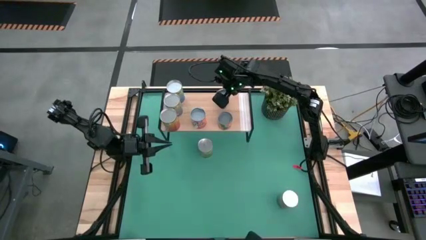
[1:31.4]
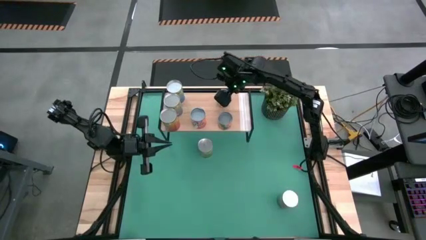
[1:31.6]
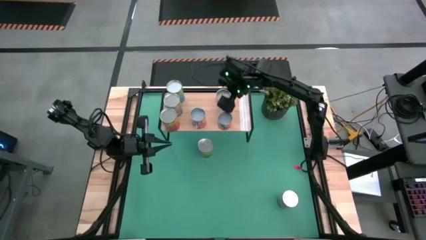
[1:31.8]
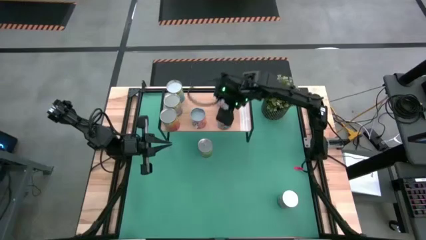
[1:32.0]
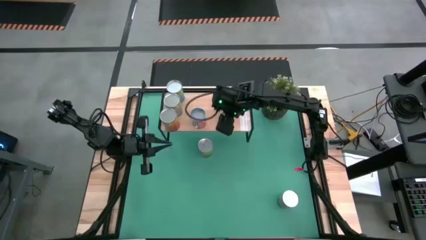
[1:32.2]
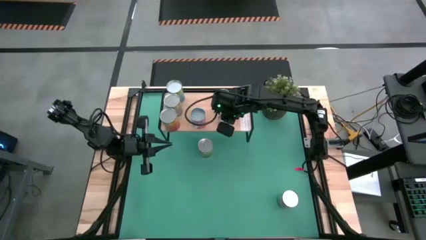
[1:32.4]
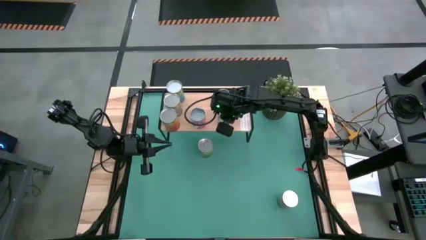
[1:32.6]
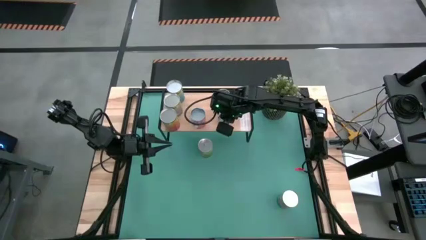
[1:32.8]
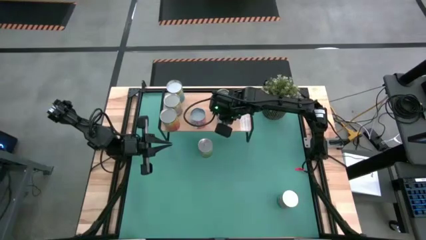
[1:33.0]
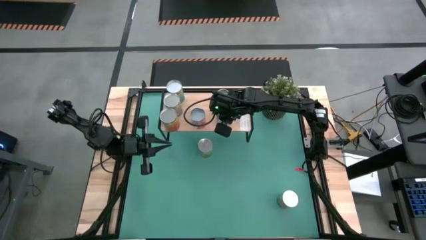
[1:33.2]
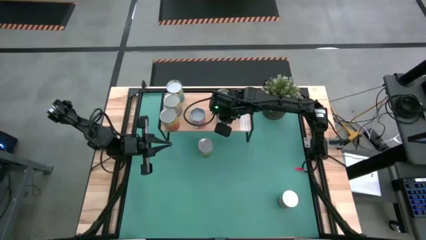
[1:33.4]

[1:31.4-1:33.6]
Task: Pick and place cans onto a shelf
Adjust the small canned oranges

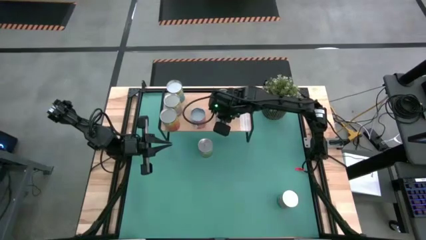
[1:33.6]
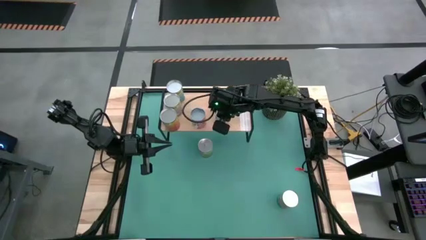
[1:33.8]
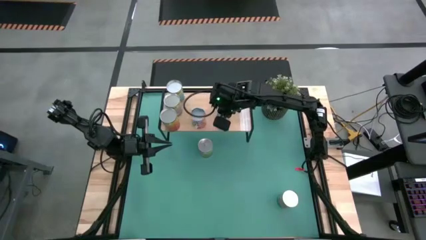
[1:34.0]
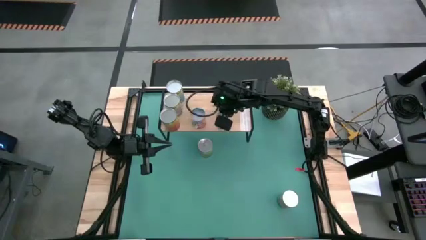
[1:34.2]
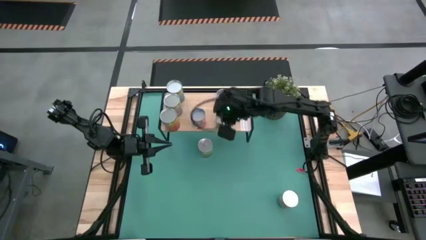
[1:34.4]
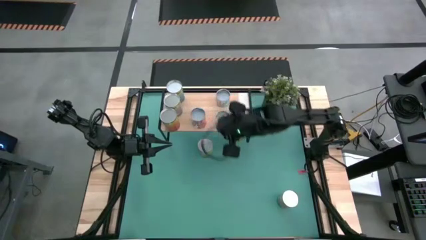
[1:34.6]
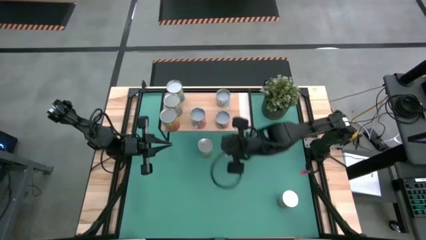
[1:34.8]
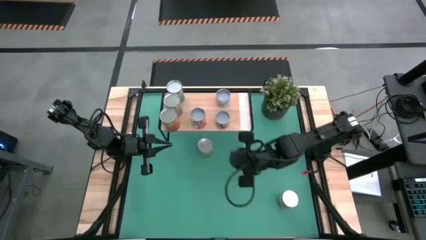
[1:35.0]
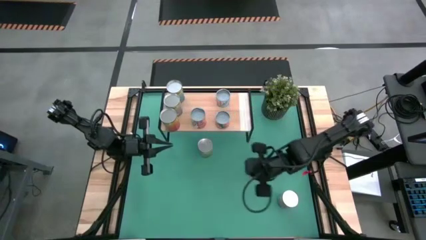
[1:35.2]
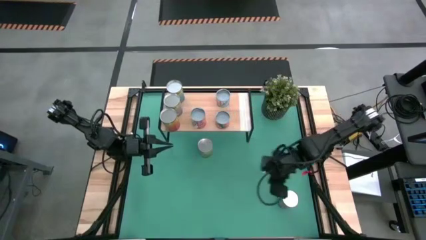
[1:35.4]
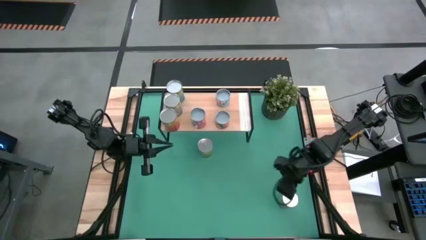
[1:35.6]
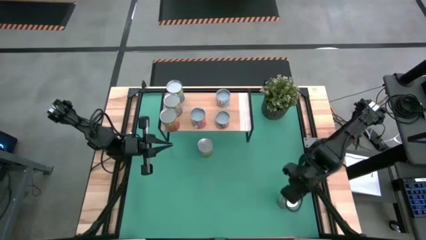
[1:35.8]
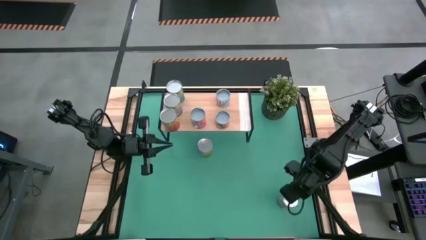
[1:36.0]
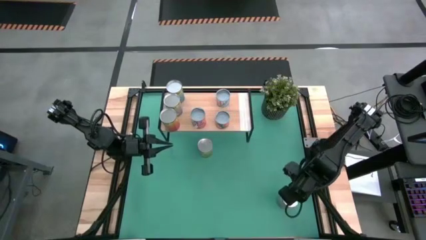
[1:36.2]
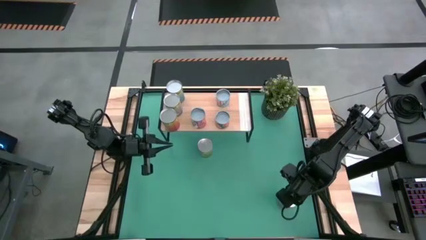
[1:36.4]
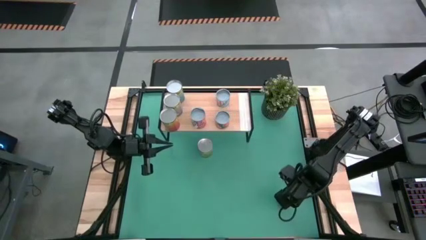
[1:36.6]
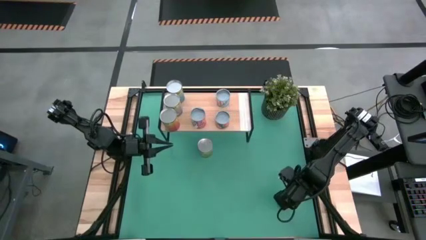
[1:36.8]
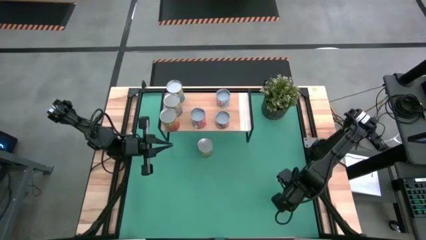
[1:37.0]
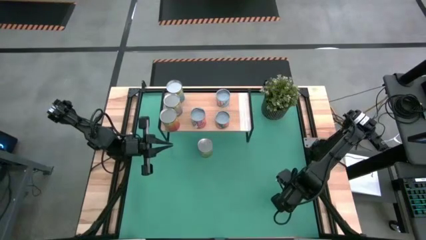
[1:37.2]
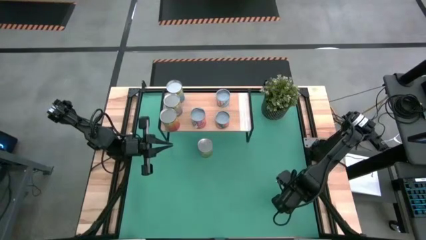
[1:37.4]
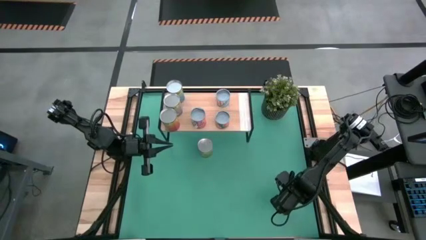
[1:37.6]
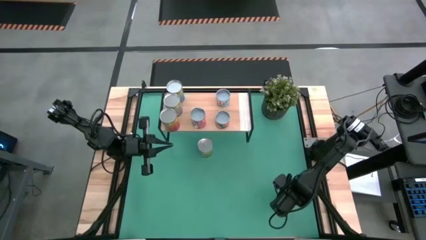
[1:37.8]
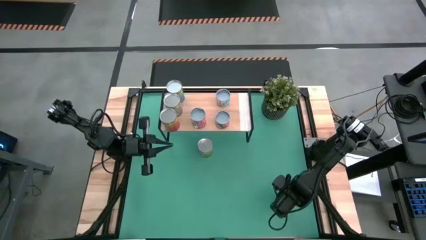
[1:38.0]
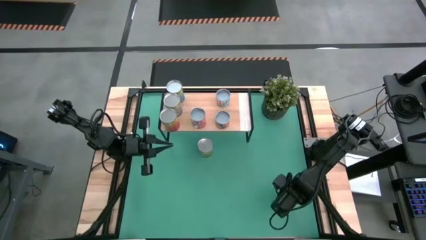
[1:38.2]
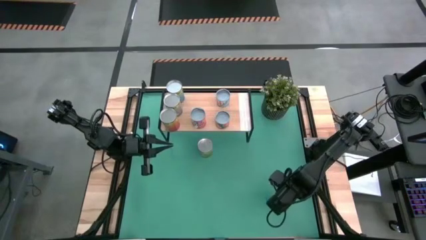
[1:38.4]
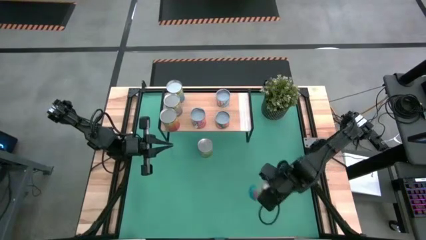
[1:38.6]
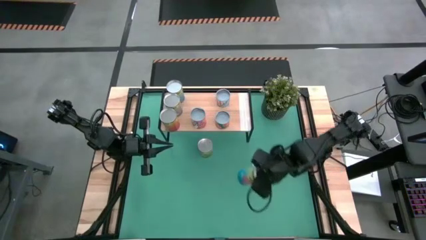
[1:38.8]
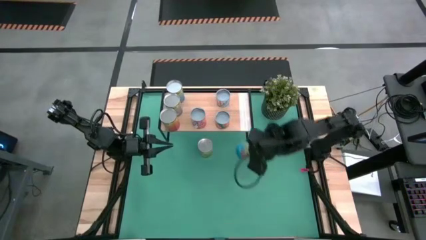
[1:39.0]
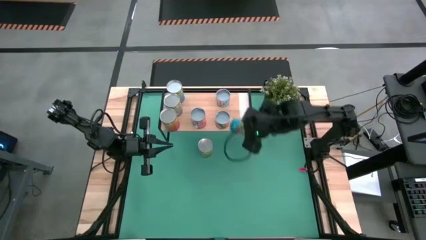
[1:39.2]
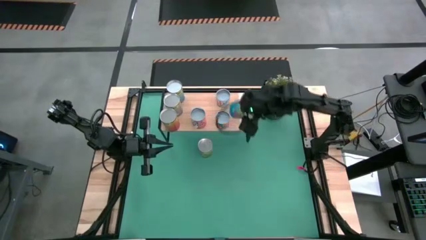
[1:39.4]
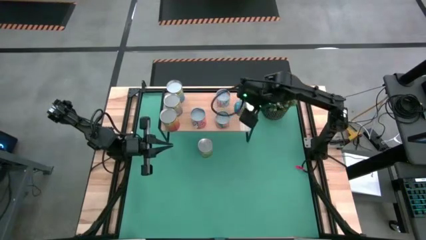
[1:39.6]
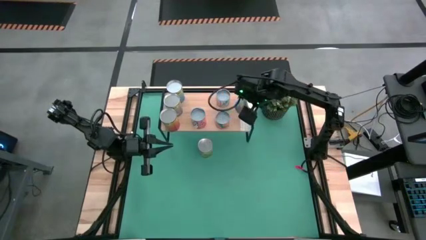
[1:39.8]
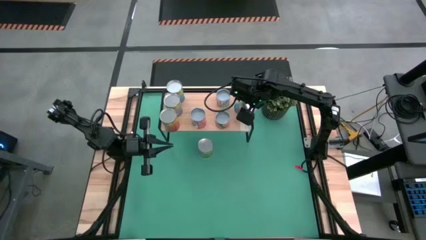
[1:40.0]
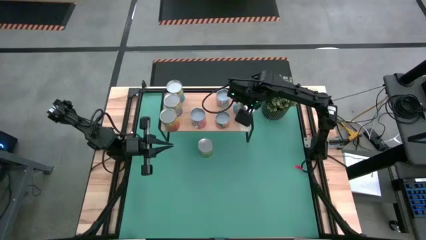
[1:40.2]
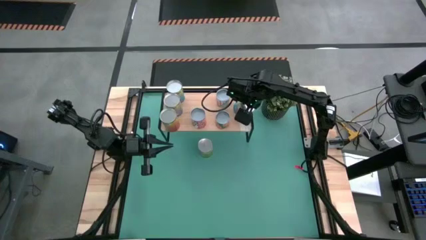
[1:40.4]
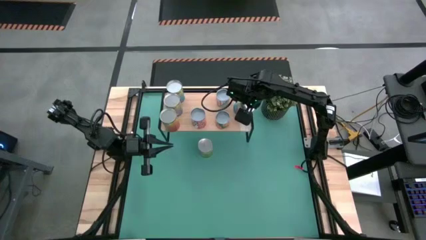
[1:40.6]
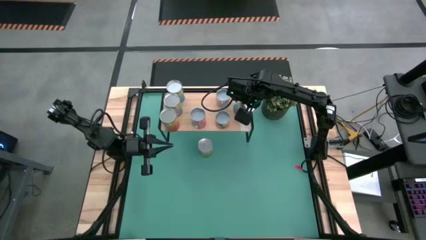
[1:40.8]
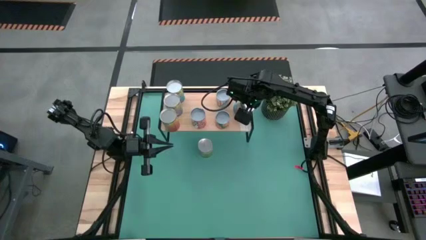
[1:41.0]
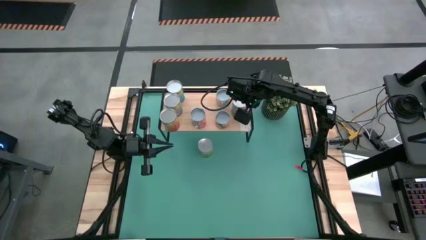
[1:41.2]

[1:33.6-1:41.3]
Put the canned tomatoes on the shelf

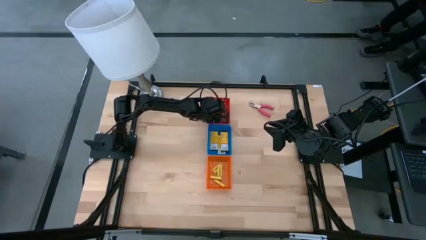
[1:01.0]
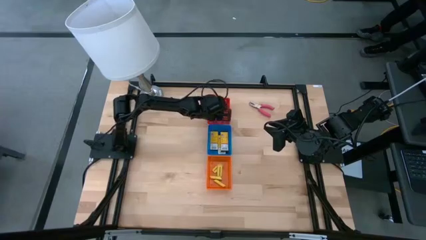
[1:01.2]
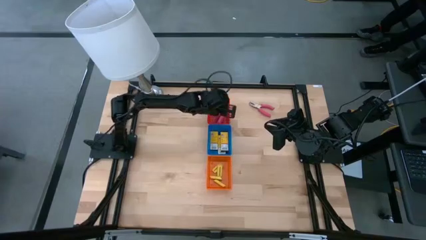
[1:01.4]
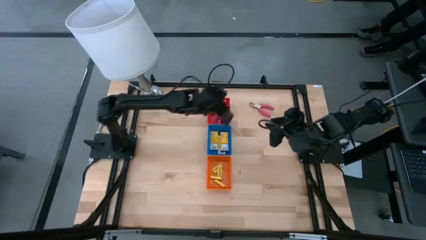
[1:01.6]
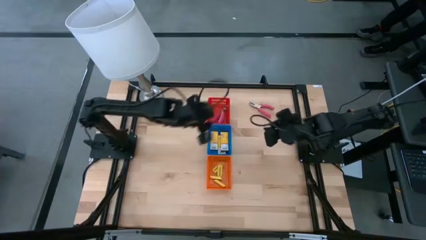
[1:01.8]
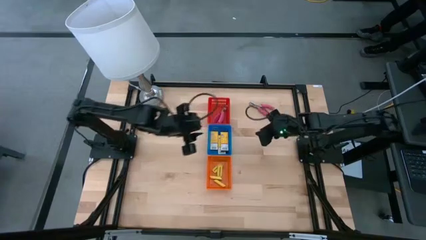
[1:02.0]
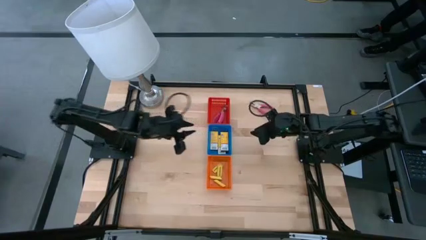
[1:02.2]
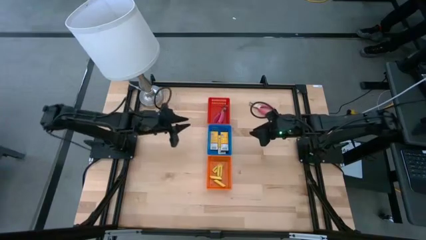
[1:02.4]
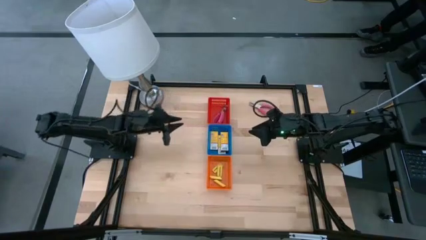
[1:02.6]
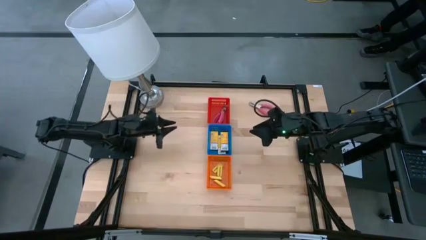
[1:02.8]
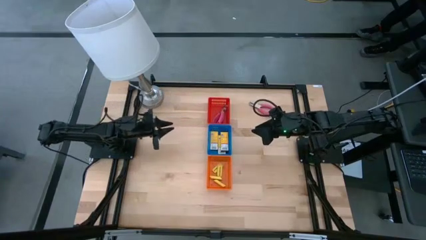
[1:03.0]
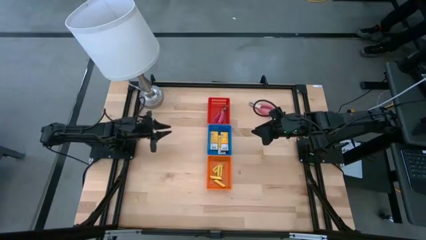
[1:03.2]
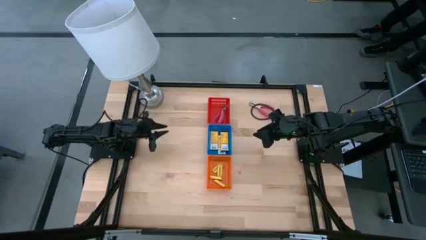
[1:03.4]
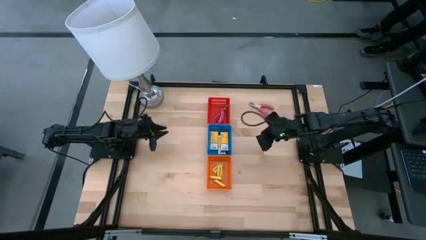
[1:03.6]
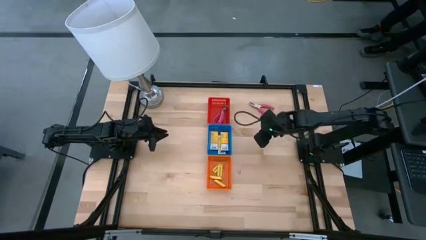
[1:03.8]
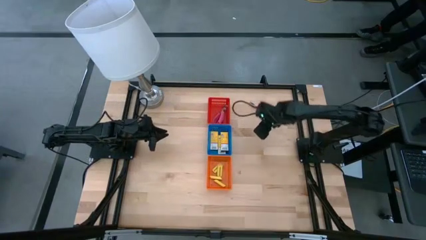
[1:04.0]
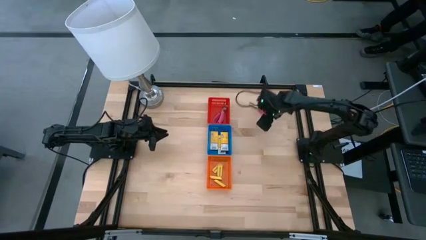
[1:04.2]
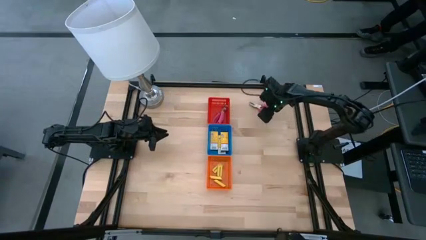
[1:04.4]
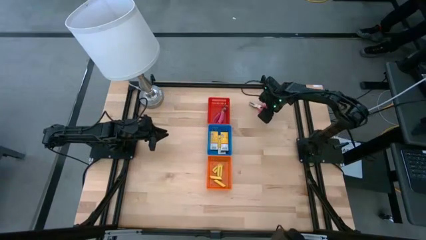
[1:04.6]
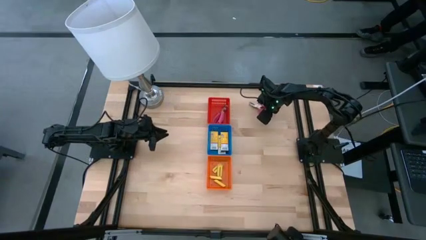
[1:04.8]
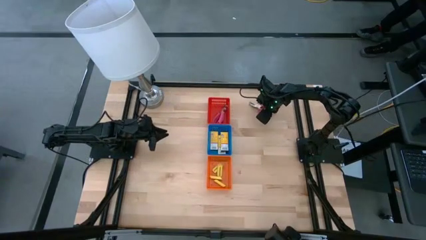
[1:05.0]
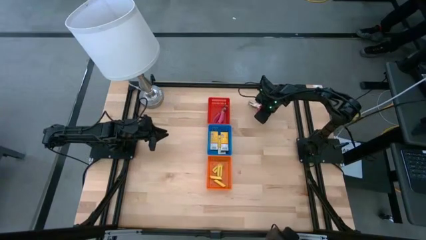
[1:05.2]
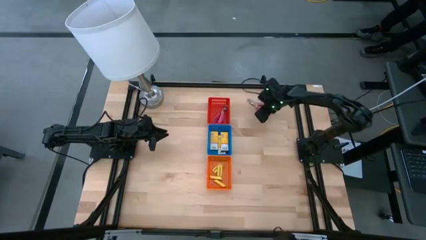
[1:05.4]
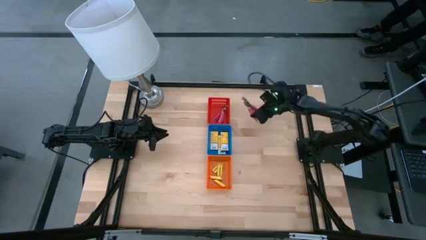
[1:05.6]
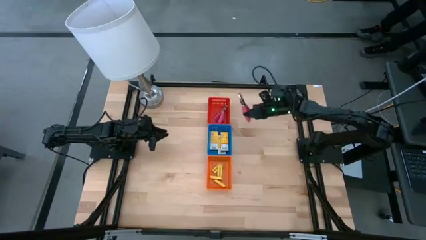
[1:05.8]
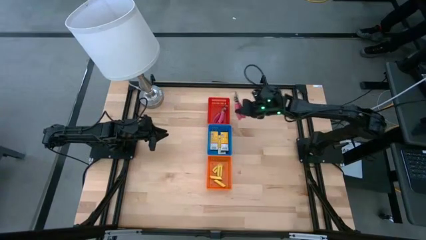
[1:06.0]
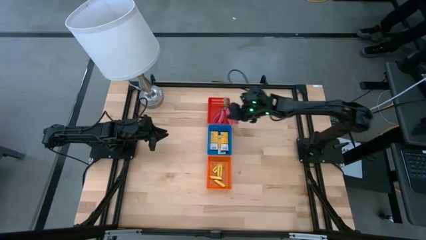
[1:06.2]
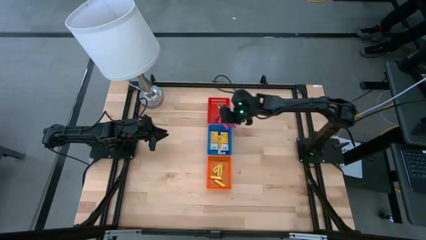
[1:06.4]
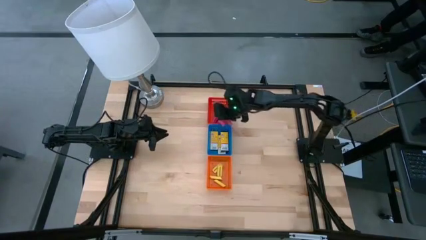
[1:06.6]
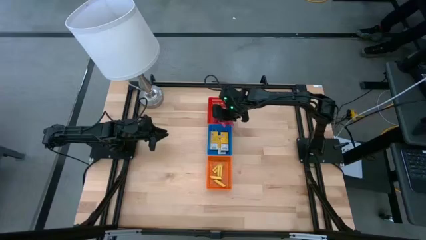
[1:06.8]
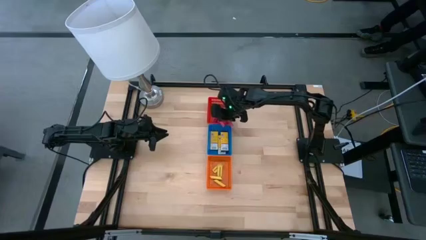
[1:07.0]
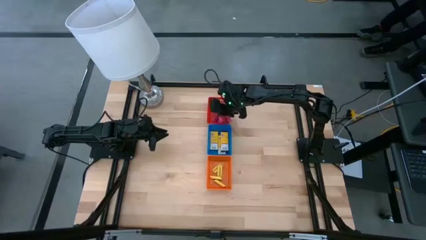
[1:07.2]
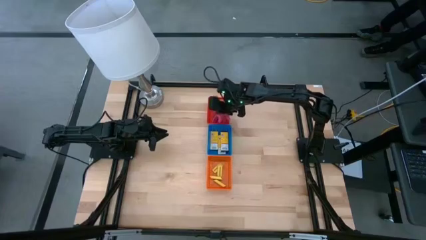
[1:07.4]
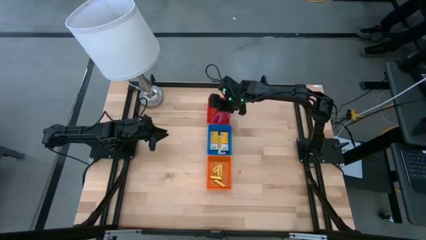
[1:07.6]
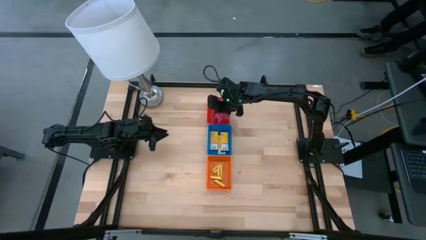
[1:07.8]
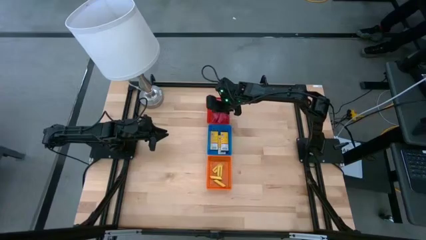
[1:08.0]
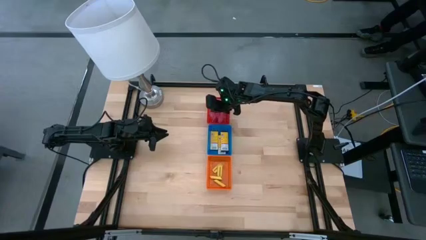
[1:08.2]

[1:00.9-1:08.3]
Task: Pick & Place School Supplies
Put the pink hole puncher into the red bin
